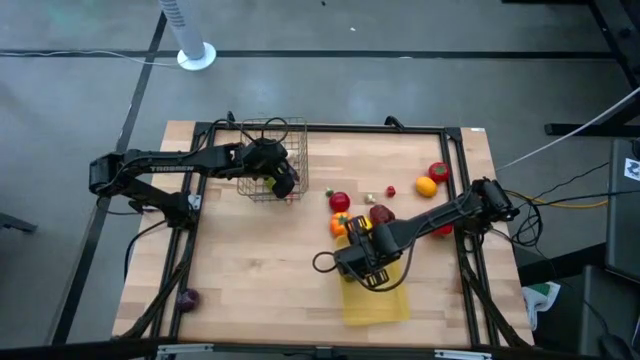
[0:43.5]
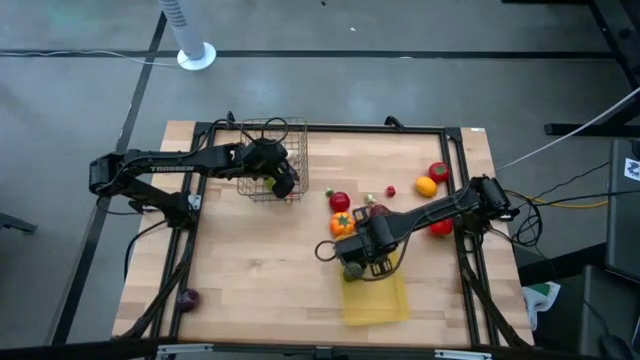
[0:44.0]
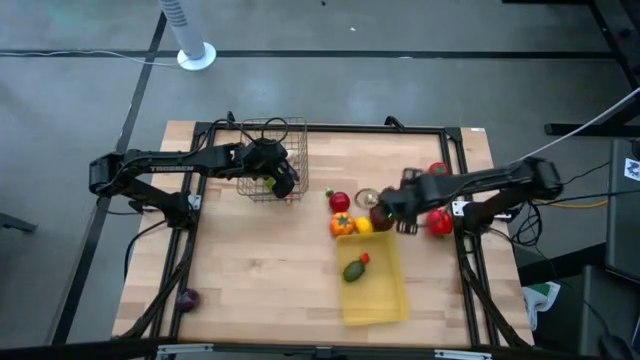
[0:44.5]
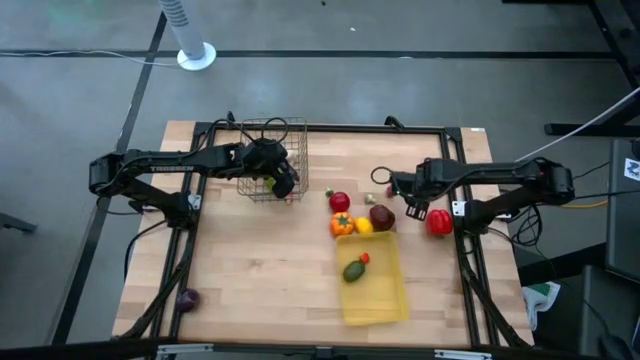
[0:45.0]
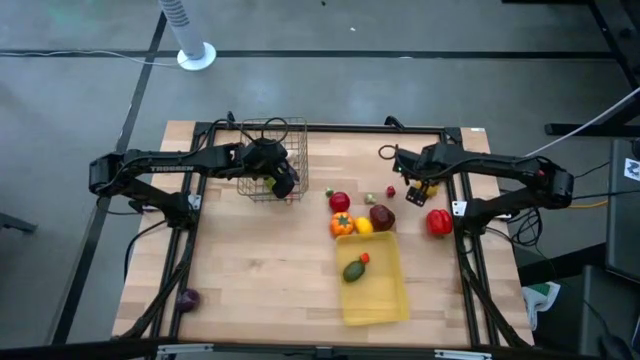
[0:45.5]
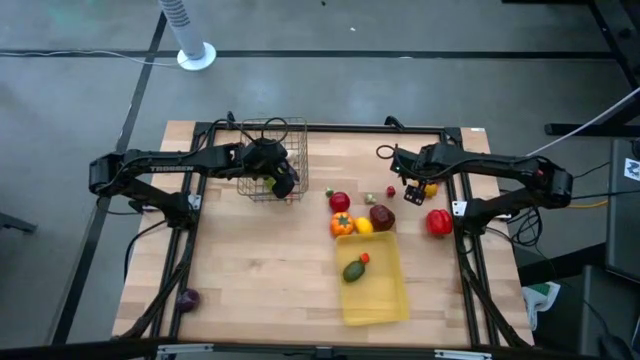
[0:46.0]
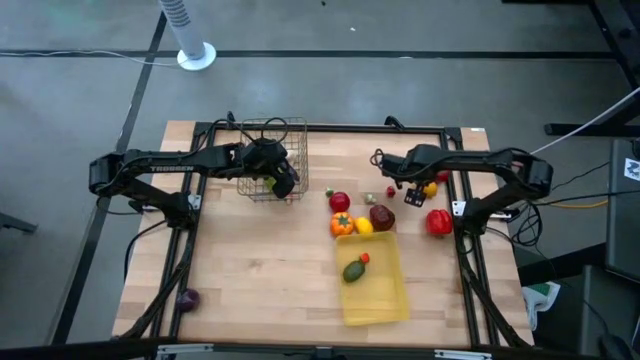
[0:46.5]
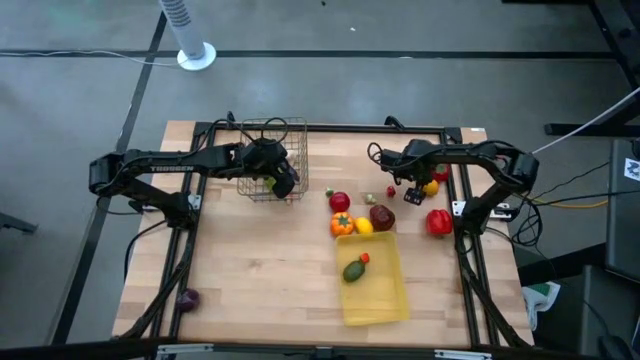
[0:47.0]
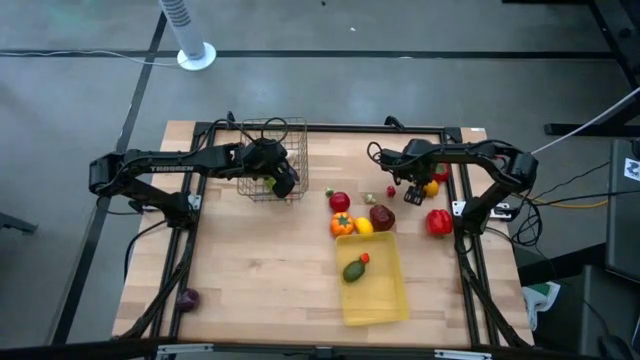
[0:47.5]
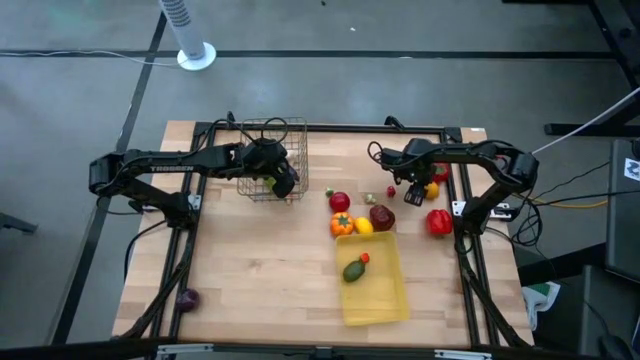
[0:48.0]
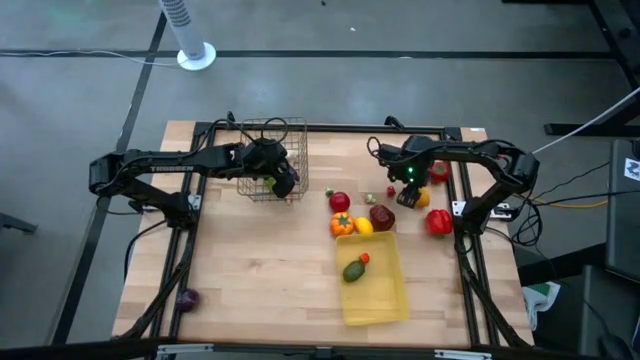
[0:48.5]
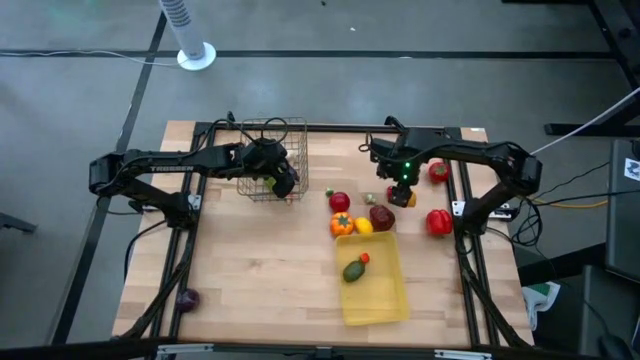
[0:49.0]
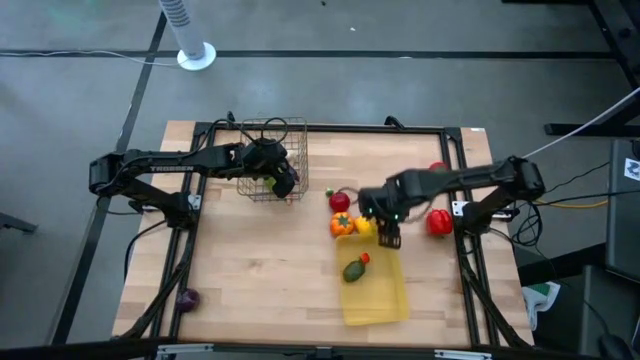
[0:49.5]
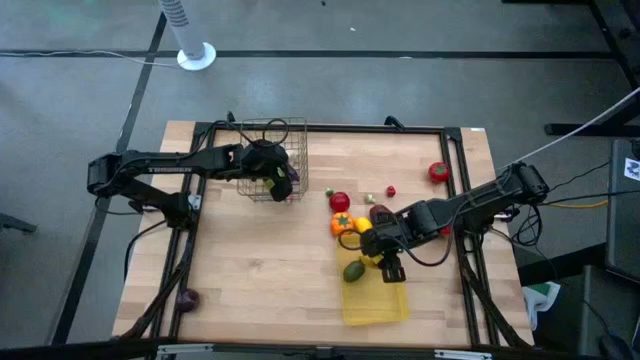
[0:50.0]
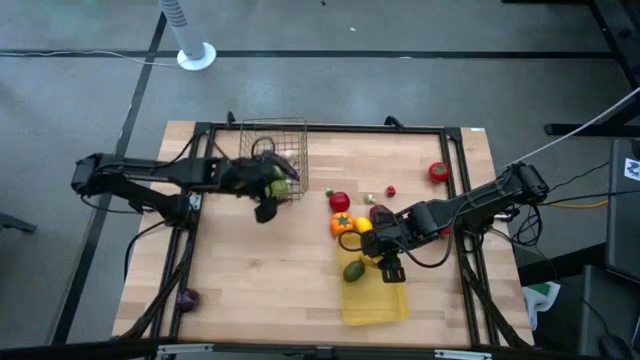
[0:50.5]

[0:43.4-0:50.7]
Task: Sort produce into baskets
Put the right lemon into the yellow bin

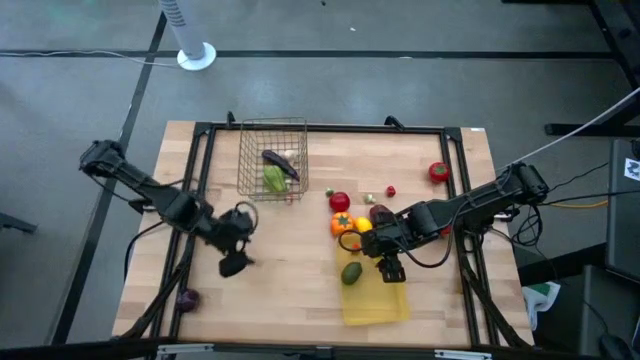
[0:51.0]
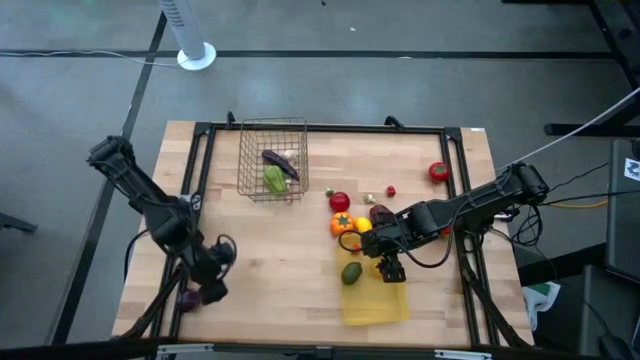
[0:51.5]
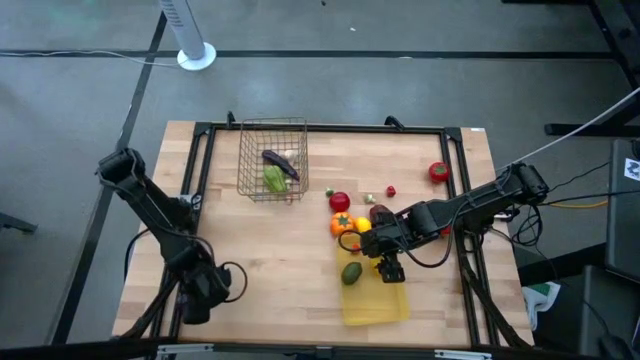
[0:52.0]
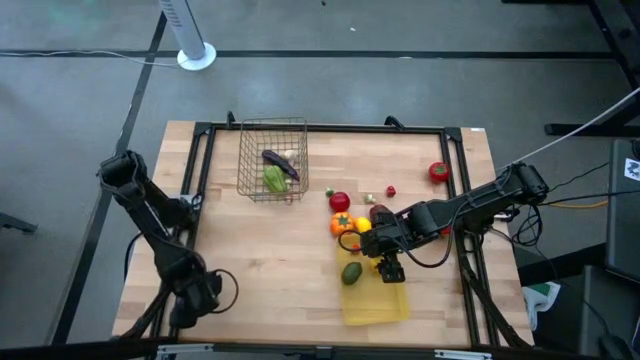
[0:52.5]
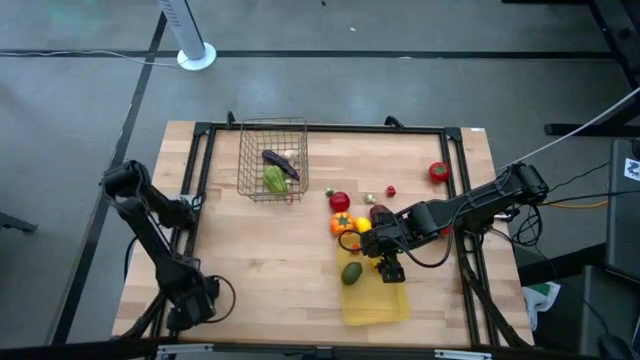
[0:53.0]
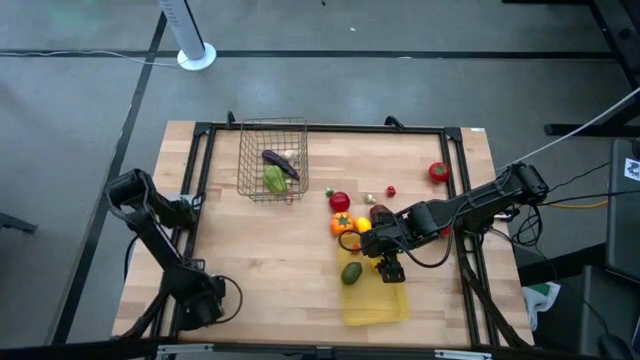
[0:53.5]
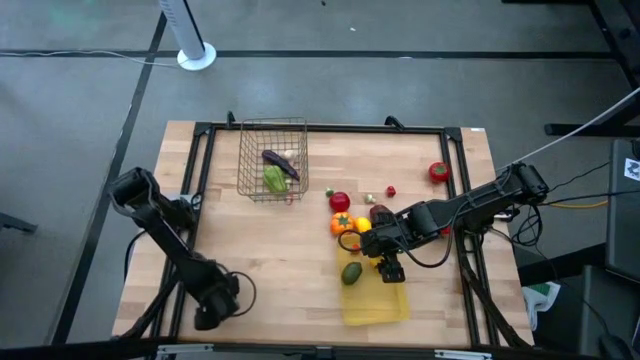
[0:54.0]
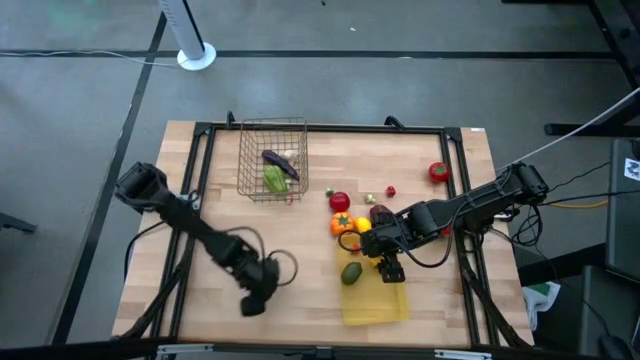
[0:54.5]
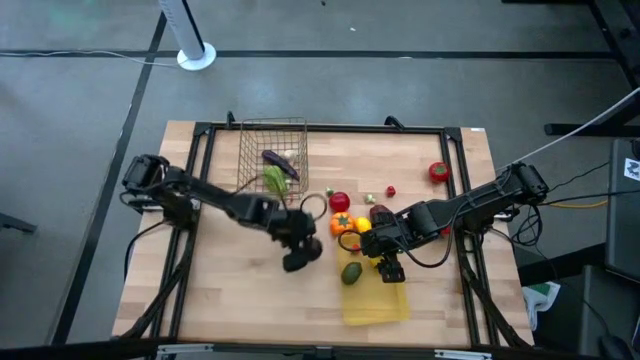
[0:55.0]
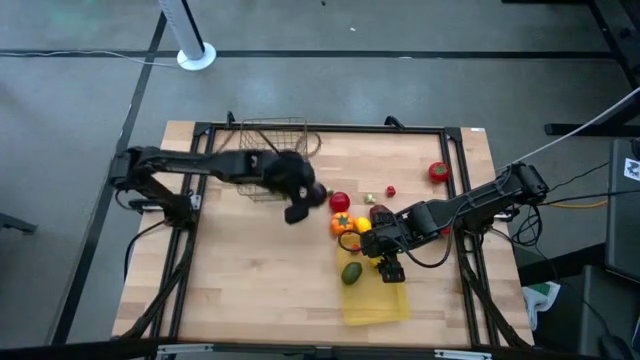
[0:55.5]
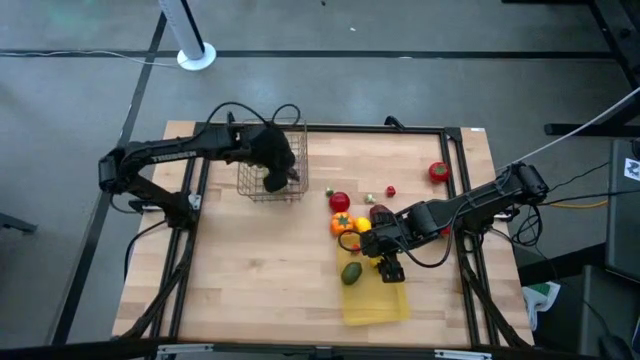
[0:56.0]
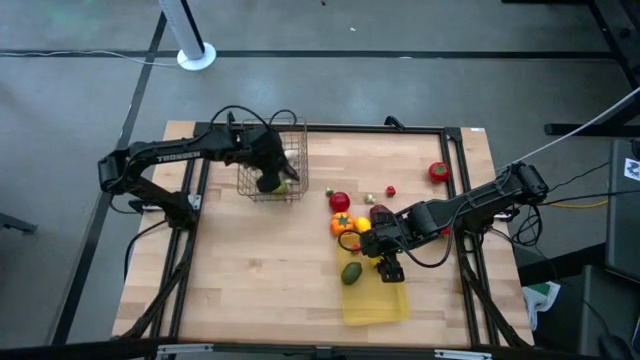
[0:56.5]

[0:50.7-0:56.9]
Put the onion into the brown wire basket

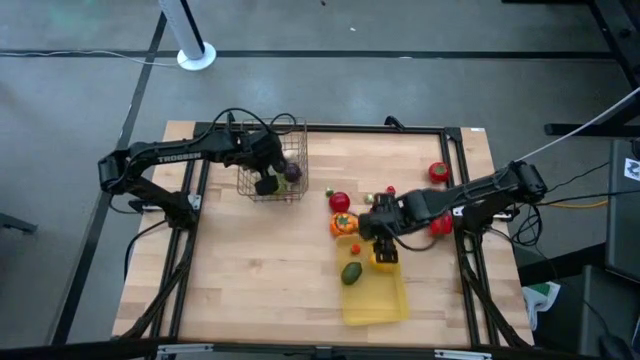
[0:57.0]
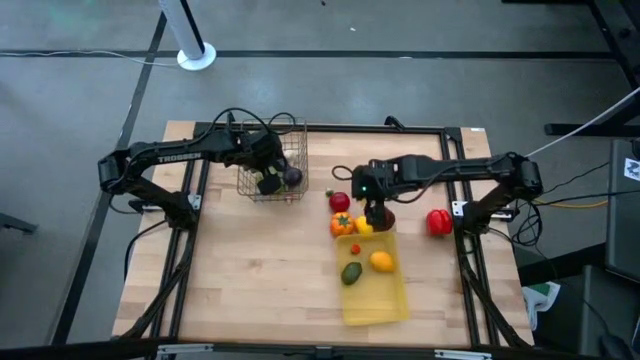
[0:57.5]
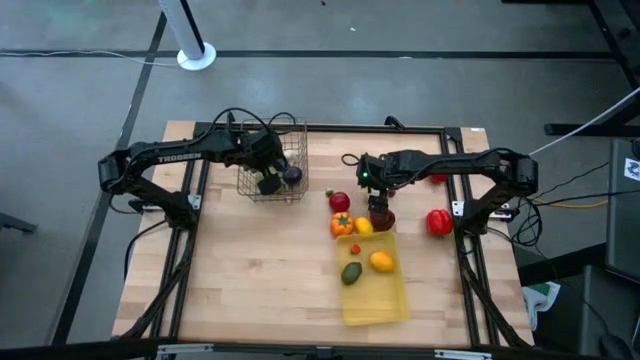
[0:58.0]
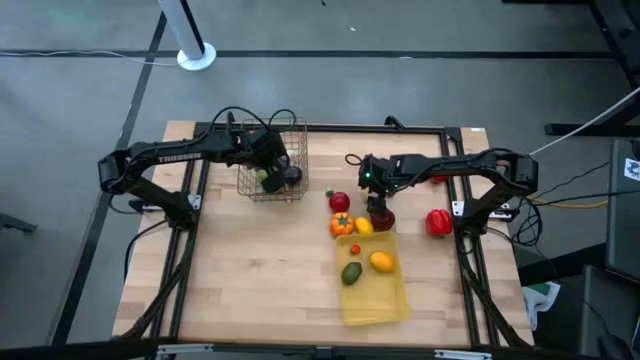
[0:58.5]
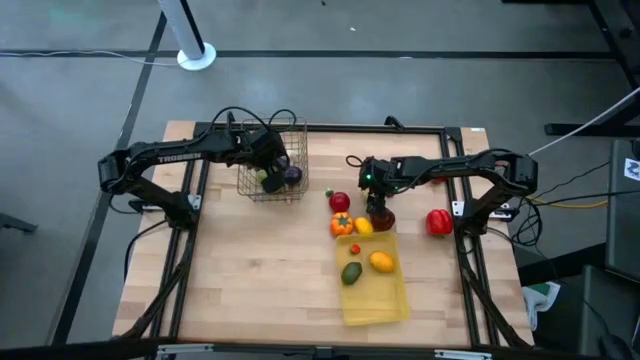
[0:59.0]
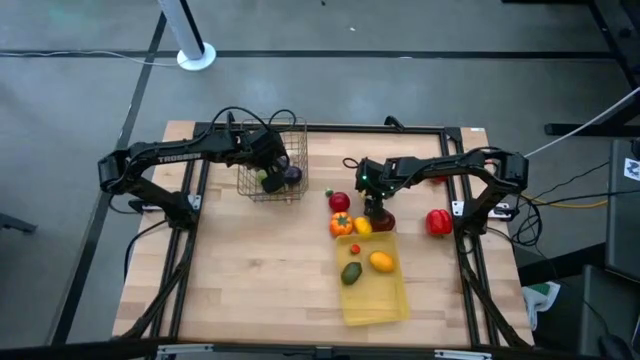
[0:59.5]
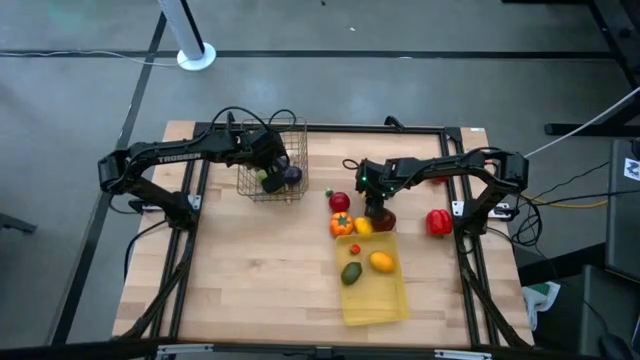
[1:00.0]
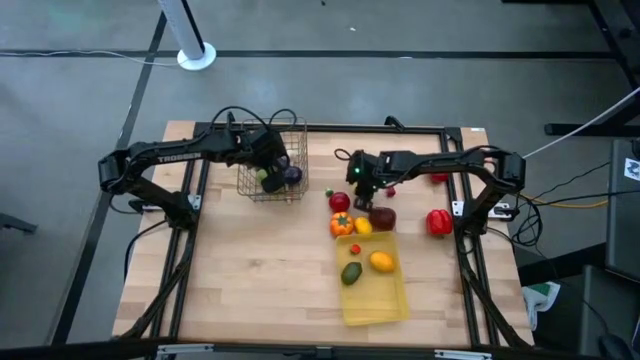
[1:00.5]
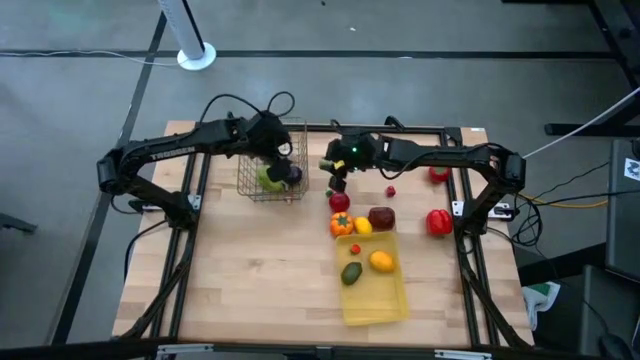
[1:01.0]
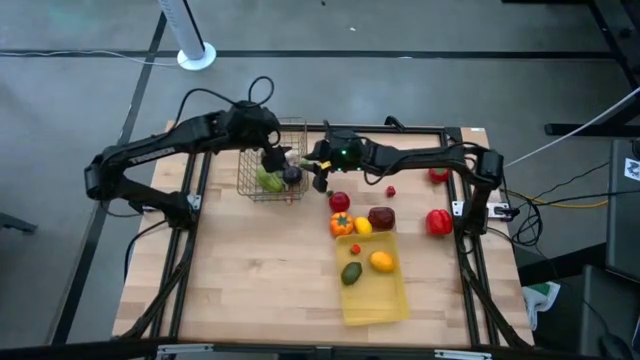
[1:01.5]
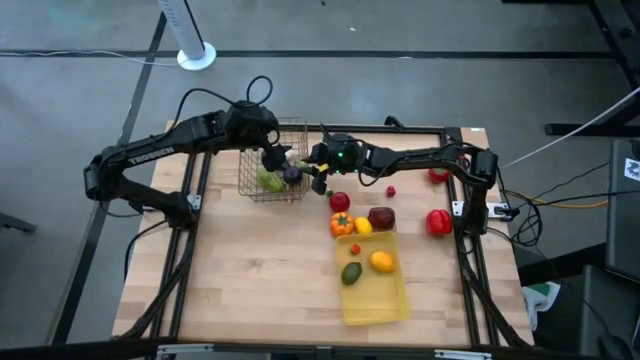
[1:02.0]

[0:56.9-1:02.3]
Put the right green mushroom into the brown wire basket

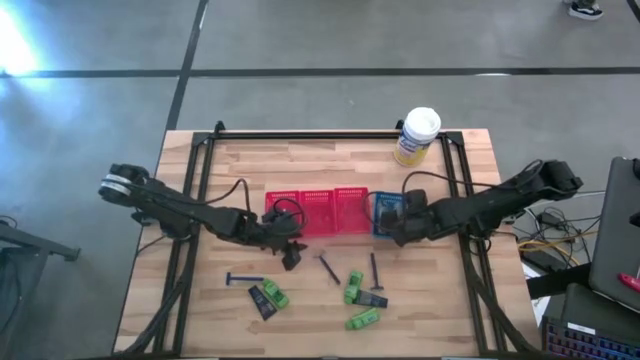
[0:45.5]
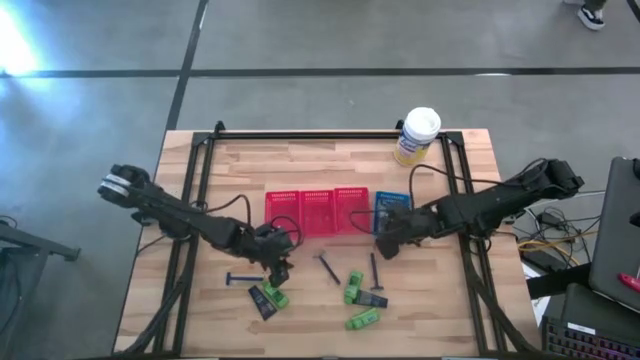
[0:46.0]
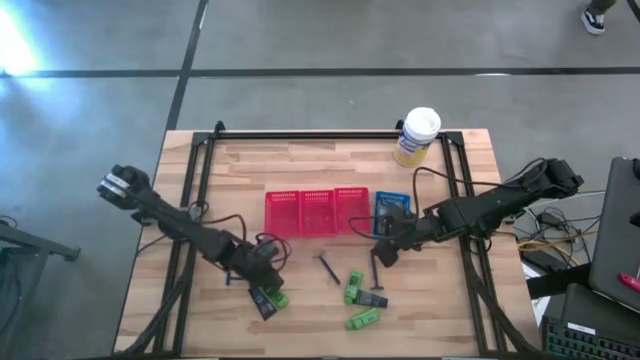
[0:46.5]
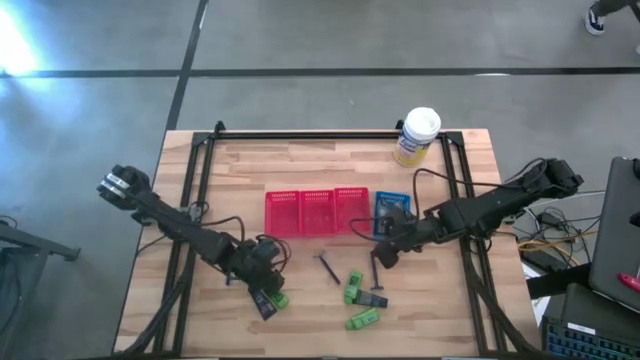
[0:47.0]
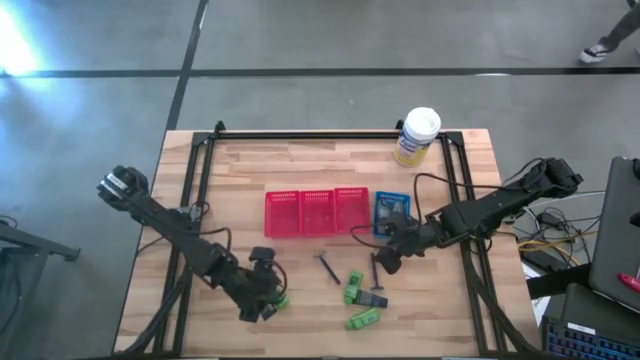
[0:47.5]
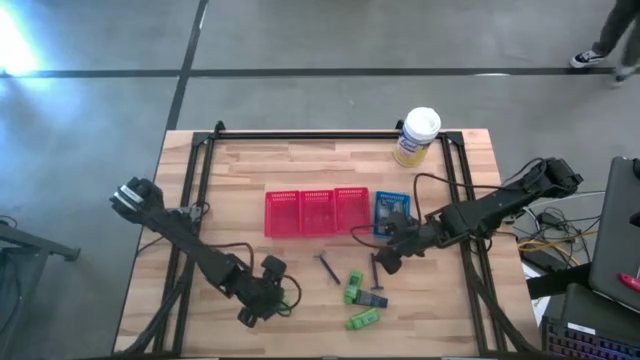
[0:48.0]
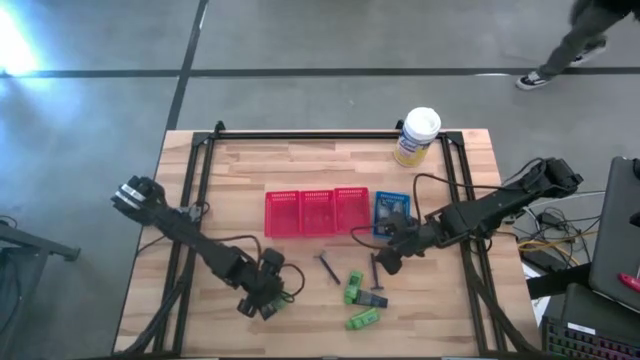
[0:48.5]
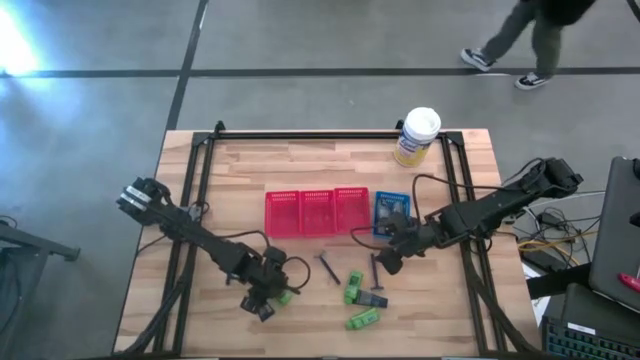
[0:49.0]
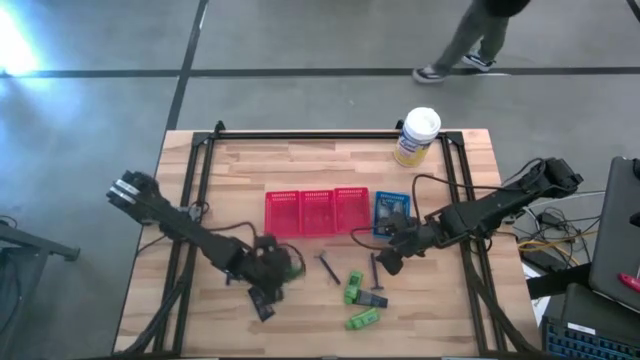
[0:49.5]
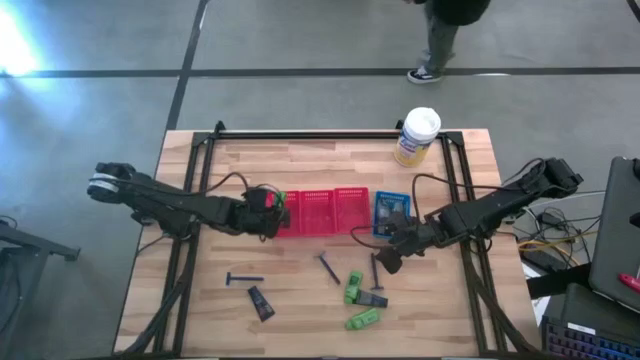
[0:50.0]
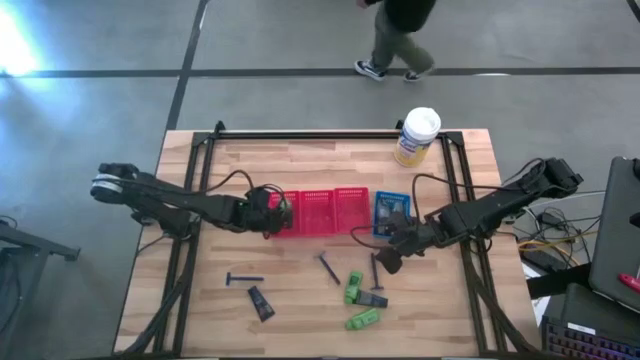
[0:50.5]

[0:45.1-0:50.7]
Task: Pick & Place Travel size toiletries
Put the green shampoo into the left red bin
